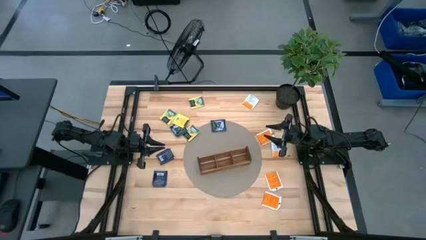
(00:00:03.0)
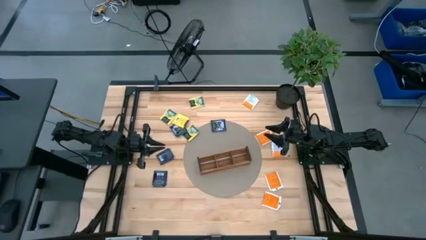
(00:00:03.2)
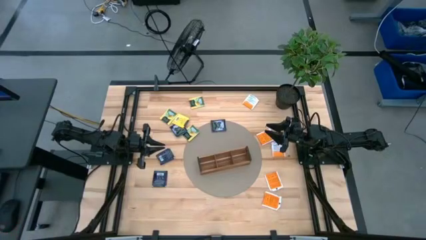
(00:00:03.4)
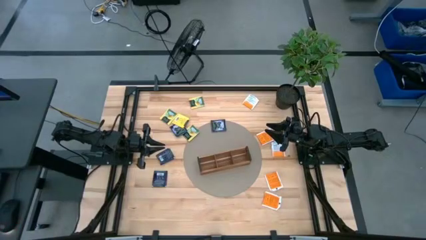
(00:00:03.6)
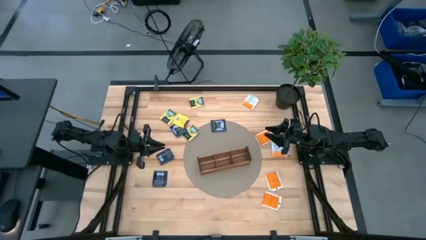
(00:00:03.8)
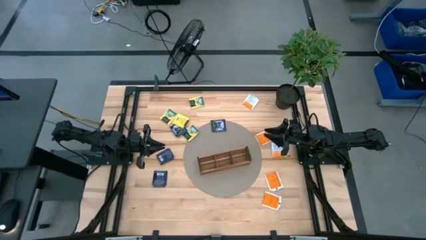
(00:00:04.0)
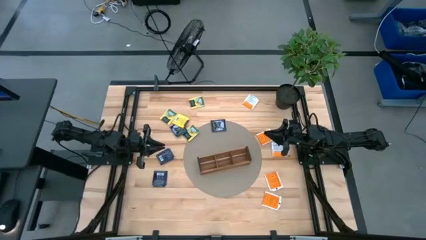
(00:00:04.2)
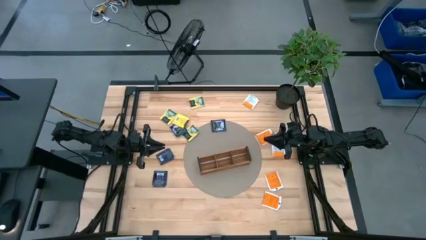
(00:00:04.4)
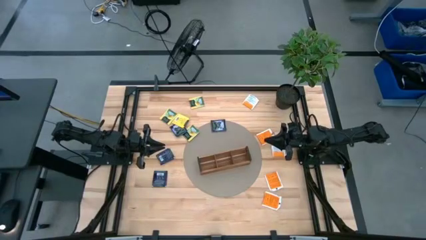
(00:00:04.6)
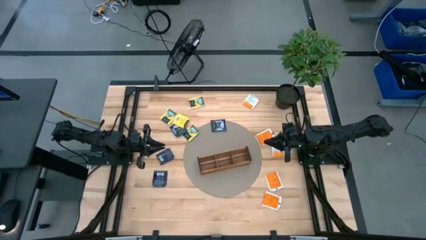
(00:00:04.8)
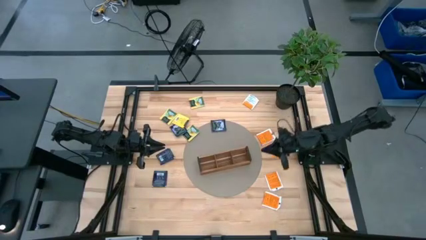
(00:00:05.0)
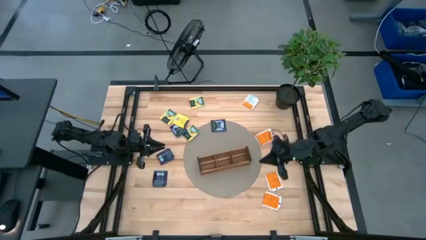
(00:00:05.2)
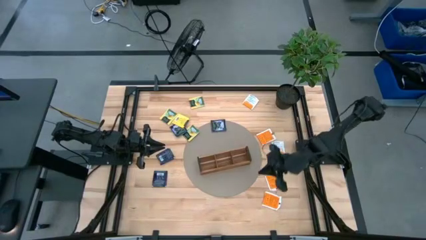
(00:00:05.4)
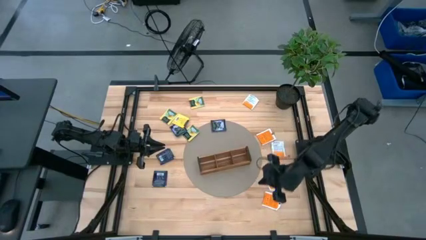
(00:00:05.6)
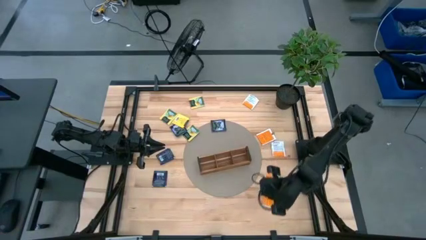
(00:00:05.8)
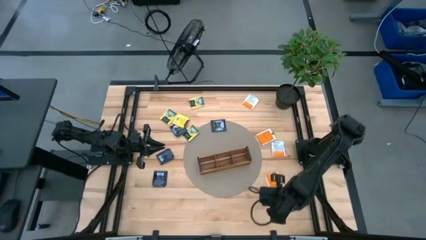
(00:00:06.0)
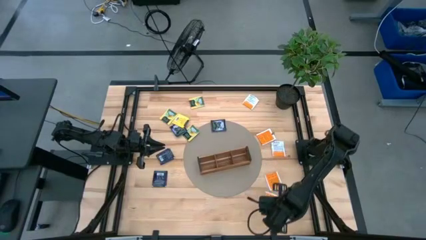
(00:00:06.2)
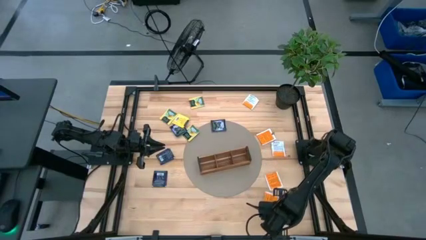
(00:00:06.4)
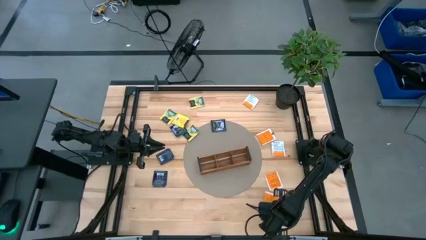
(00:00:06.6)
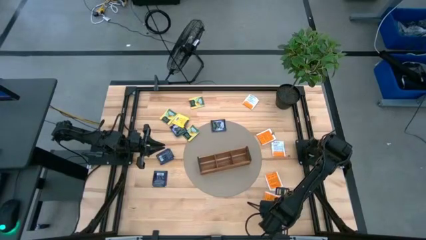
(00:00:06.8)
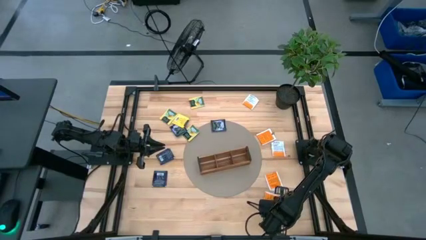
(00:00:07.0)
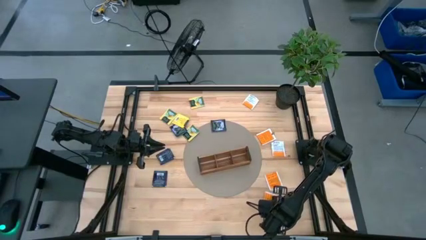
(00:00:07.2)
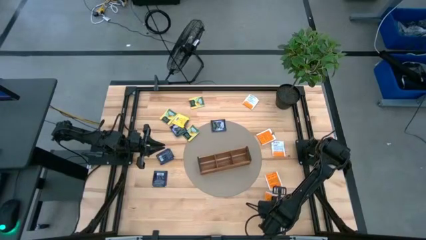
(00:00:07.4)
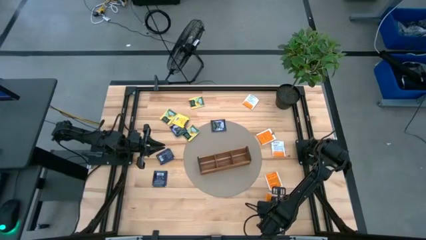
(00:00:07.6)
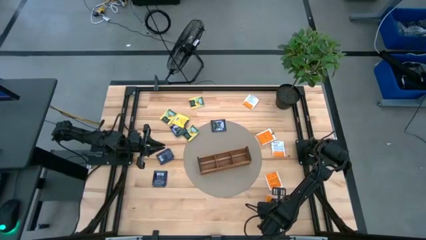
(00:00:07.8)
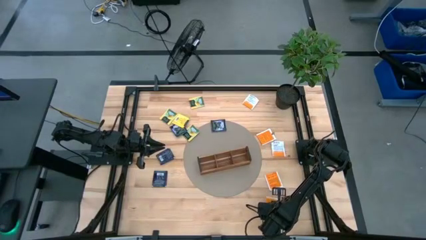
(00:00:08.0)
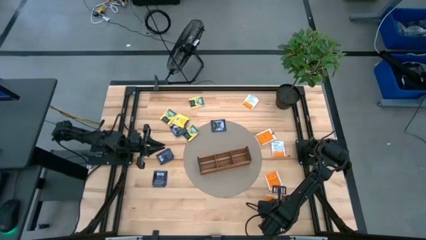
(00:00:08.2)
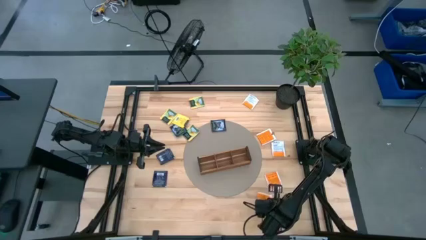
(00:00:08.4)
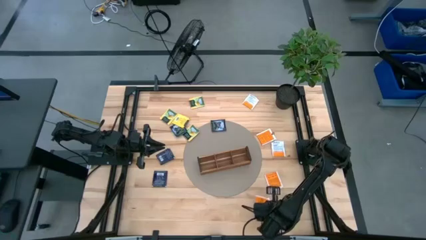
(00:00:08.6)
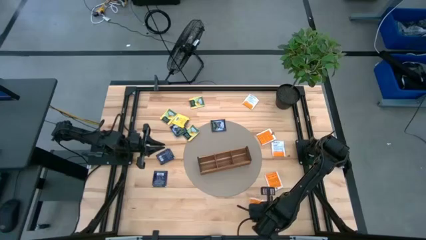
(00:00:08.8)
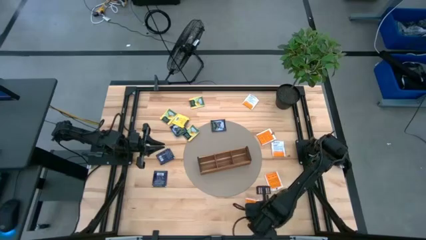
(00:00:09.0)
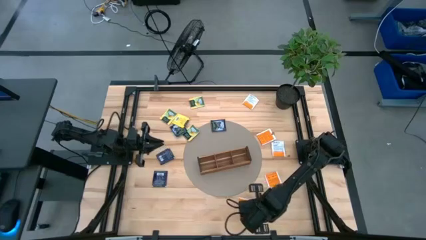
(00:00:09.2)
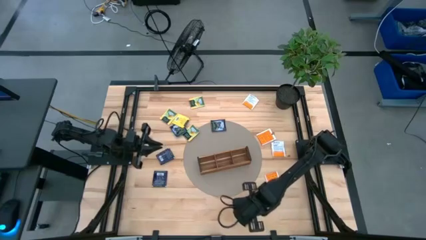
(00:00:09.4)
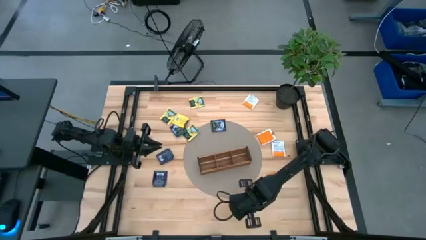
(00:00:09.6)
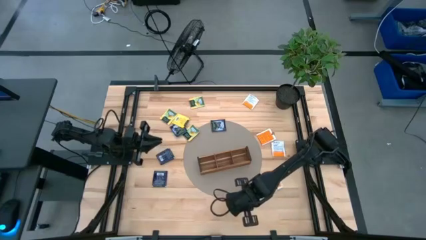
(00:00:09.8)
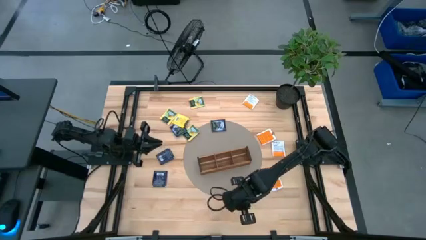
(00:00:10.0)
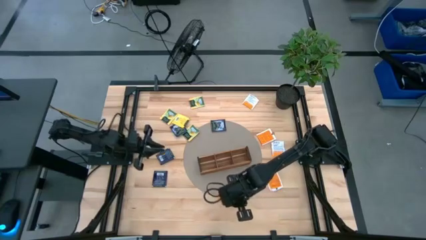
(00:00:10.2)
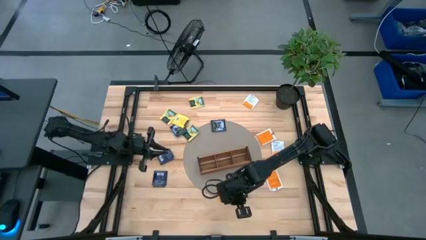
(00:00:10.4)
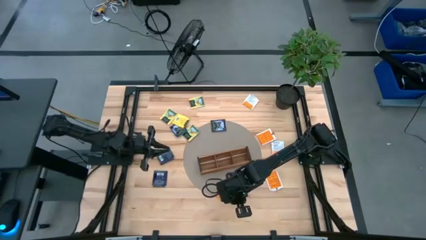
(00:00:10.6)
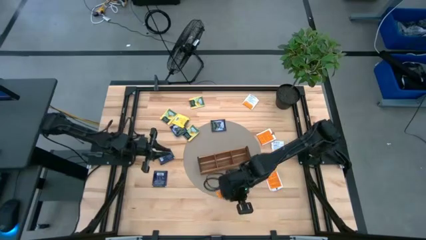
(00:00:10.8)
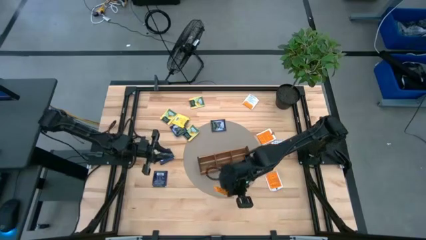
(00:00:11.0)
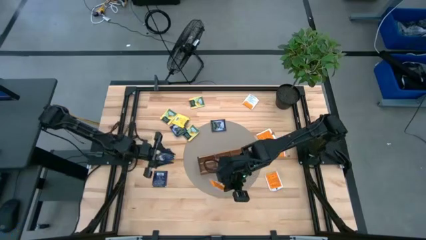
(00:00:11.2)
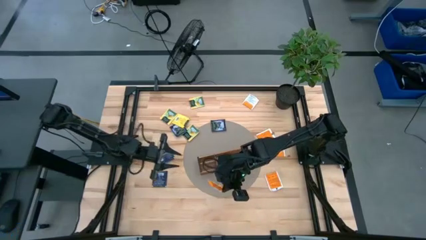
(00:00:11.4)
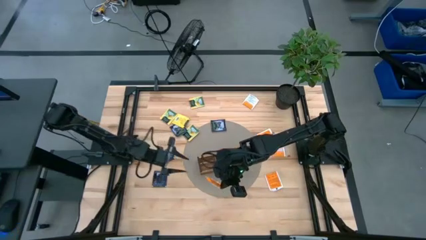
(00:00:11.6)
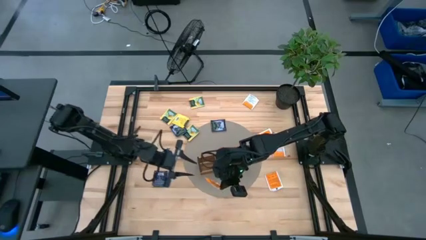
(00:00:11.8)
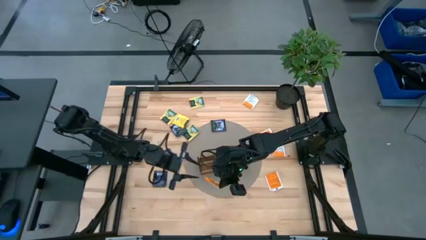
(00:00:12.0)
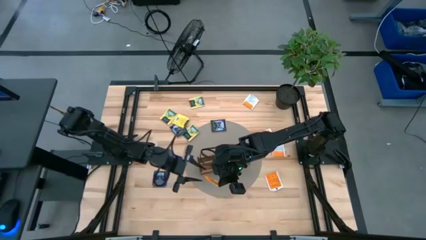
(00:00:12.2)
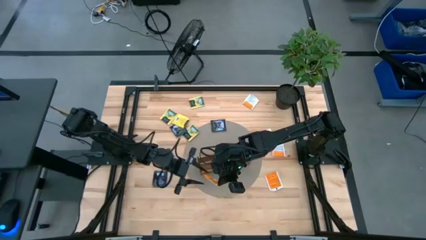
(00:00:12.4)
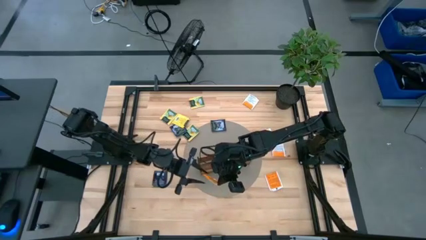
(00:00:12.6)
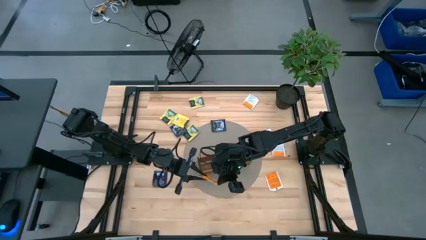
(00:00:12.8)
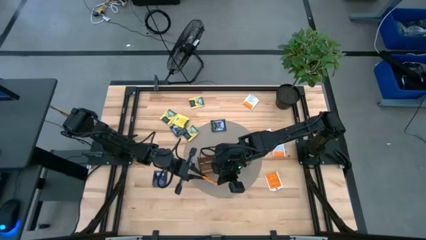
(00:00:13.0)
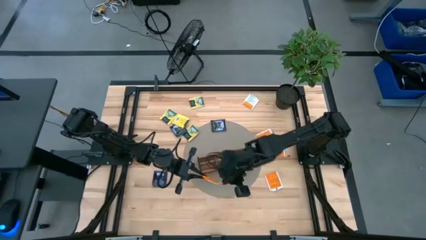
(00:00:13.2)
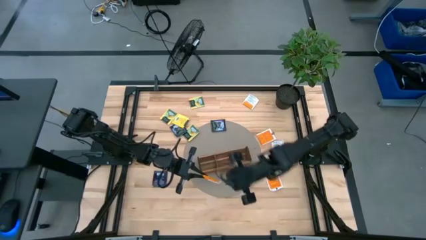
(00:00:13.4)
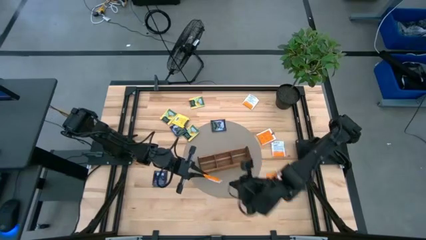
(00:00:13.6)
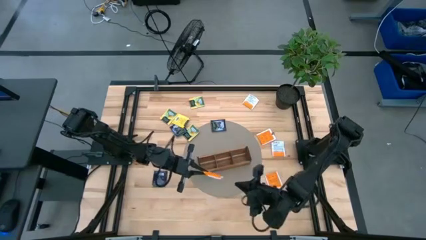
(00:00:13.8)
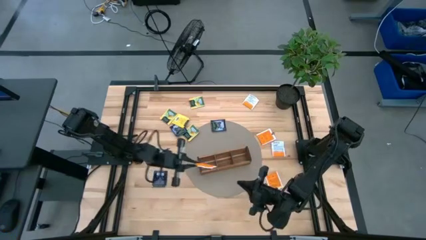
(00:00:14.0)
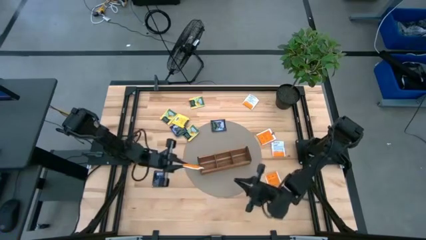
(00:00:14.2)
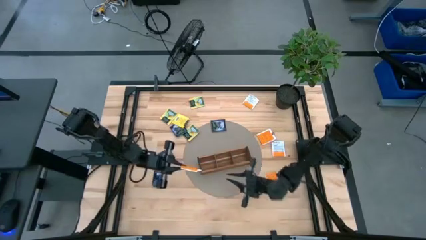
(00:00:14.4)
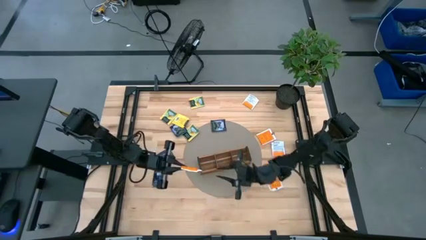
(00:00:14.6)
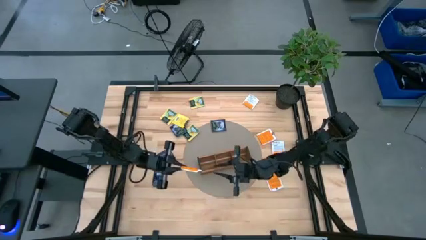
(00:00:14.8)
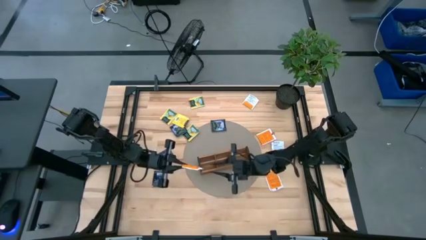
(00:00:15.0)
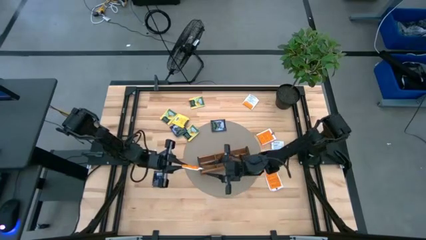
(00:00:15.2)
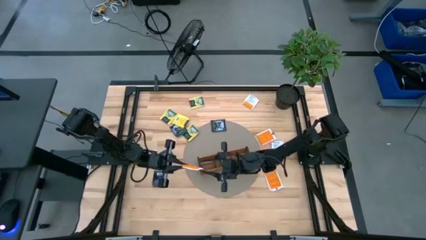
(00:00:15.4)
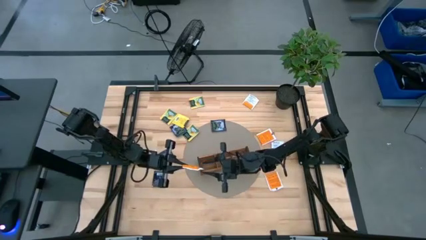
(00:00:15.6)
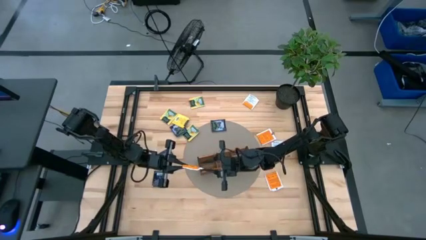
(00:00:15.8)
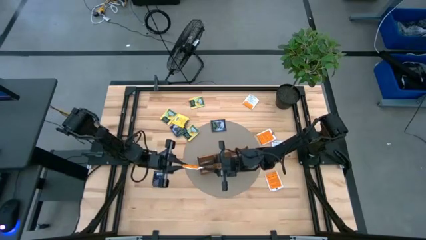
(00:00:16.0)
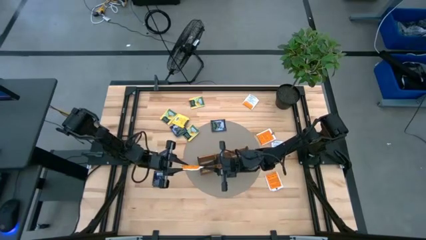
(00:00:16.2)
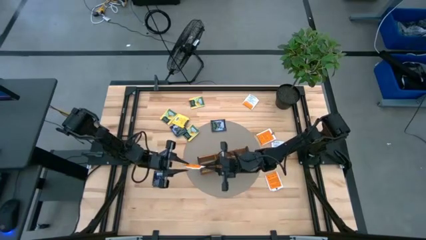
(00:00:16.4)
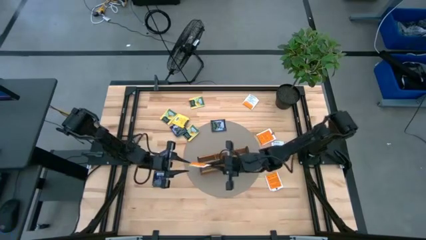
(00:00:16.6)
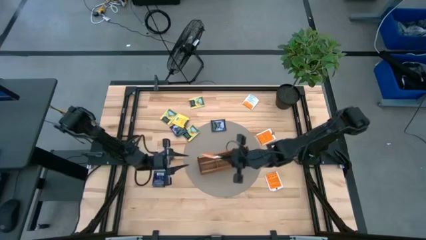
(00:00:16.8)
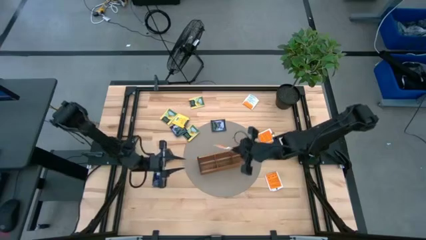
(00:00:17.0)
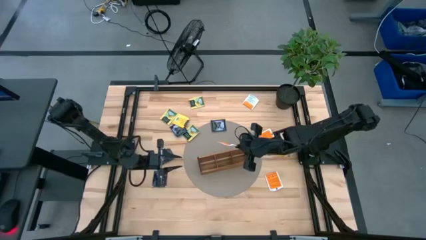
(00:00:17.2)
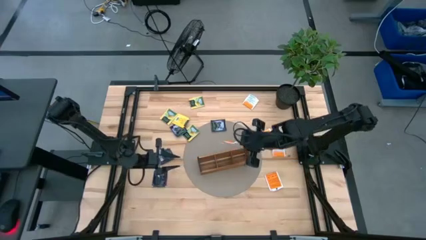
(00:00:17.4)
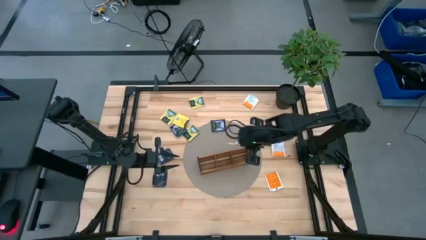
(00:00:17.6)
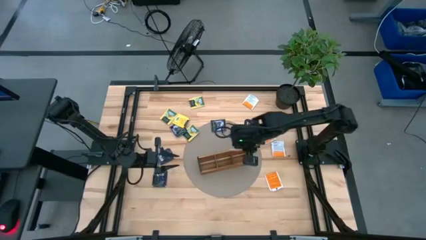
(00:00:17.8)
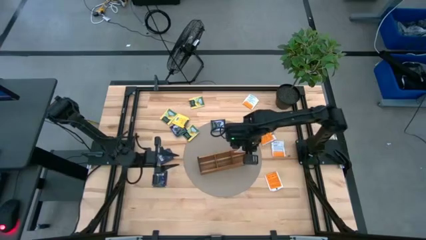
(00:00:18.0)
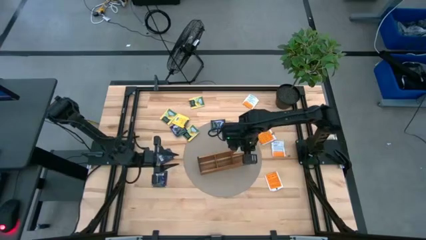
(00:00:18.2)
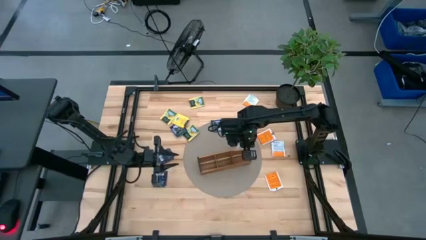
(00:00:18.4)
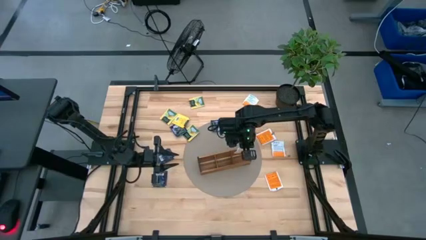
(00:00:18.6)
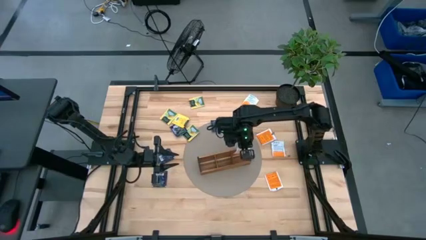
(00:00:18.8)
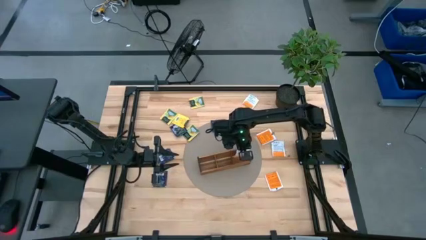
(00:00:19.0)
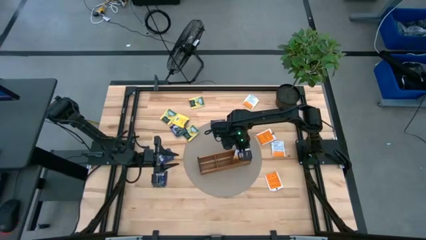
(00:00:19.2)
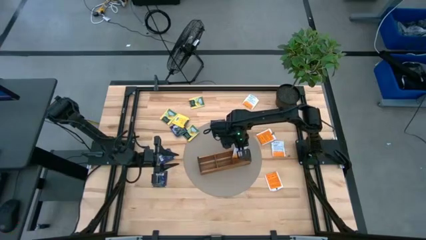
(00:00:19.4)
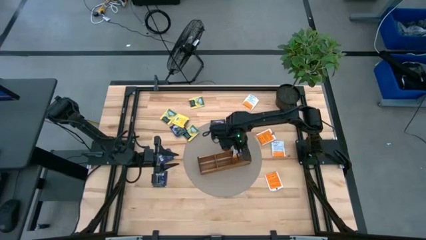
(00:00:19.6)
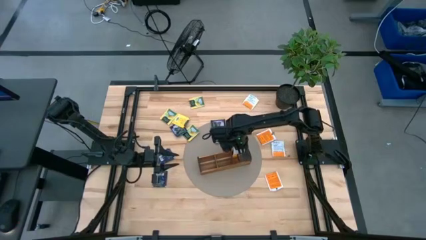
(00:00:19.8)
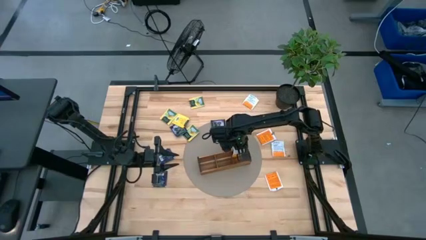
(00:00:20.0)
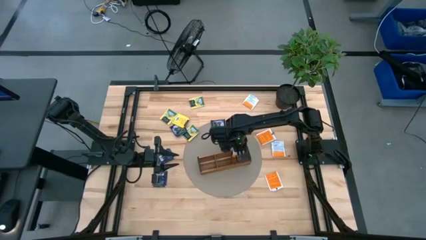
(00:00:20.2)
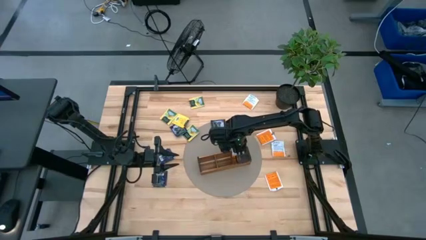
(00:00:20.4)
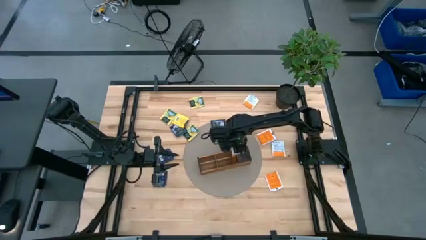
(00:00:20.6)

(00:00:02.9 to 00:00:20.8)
Task: Pick & Place Tea
Put the orange tea bag into the right section of the wooden organizer
